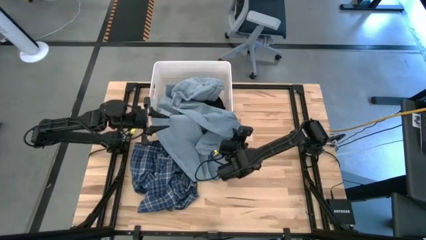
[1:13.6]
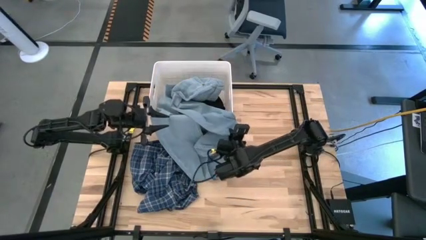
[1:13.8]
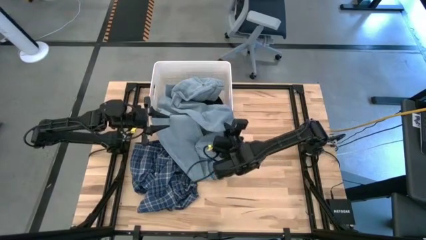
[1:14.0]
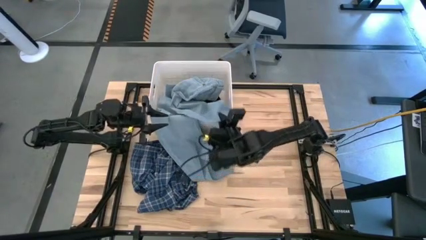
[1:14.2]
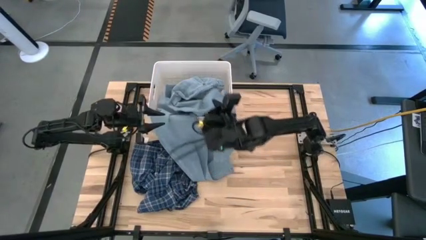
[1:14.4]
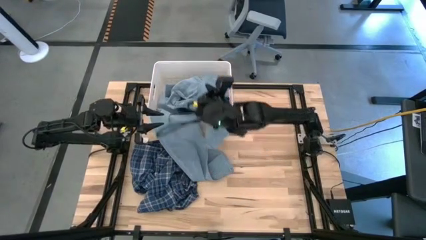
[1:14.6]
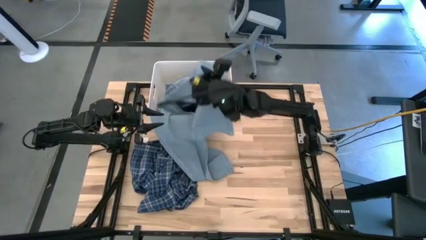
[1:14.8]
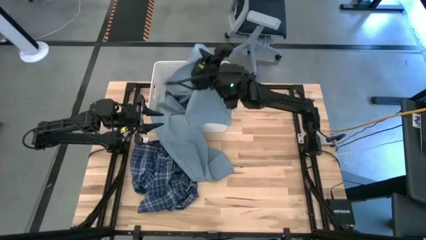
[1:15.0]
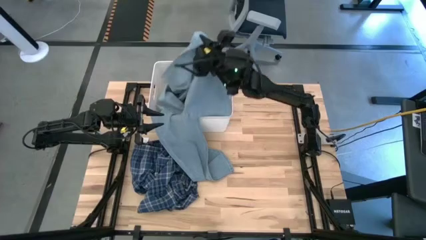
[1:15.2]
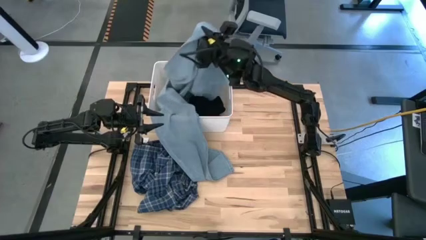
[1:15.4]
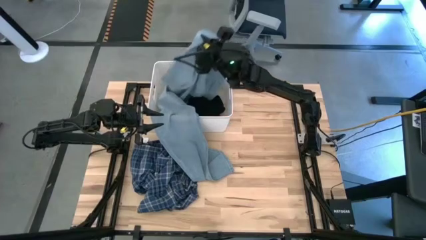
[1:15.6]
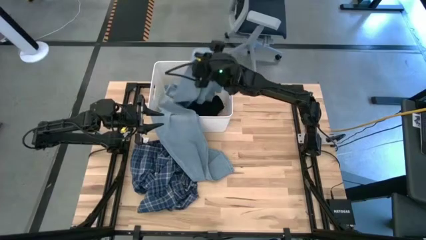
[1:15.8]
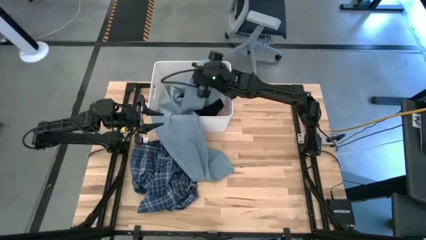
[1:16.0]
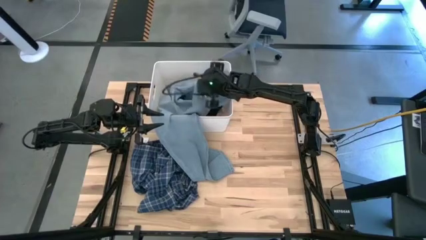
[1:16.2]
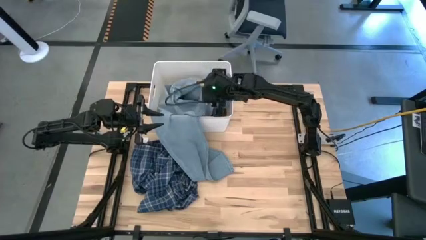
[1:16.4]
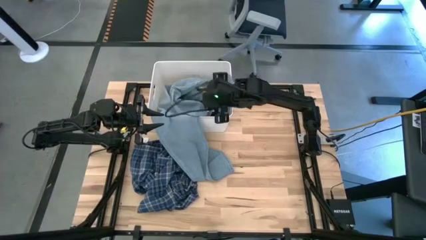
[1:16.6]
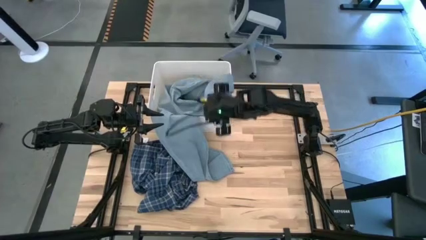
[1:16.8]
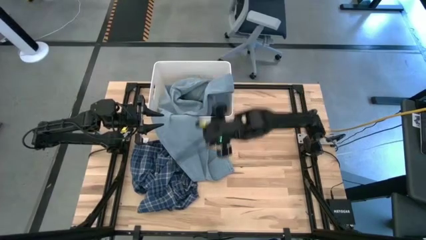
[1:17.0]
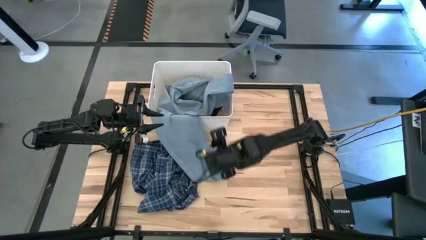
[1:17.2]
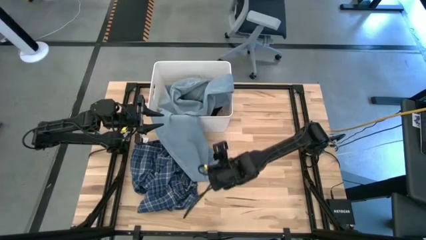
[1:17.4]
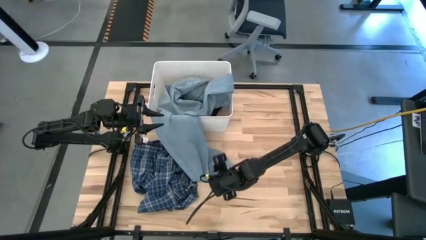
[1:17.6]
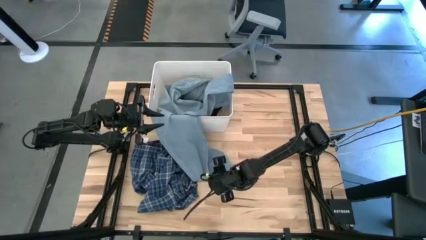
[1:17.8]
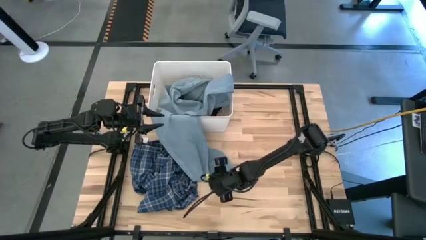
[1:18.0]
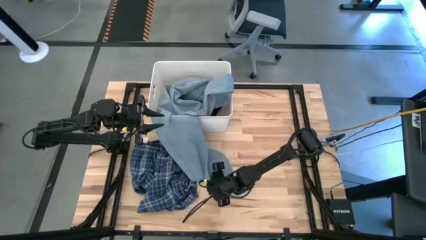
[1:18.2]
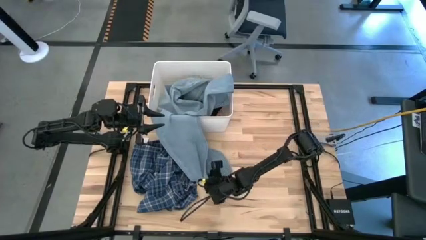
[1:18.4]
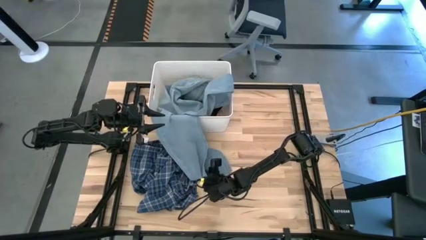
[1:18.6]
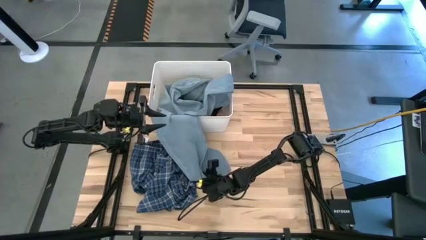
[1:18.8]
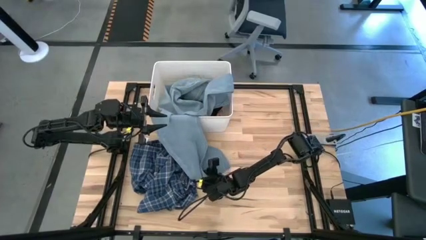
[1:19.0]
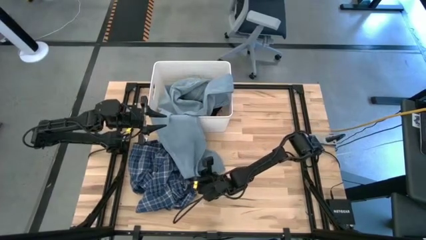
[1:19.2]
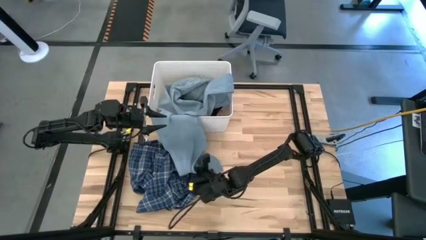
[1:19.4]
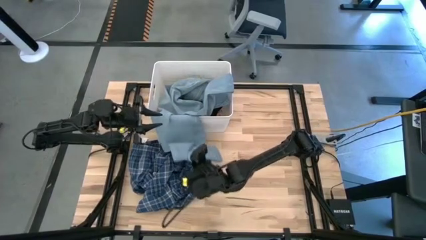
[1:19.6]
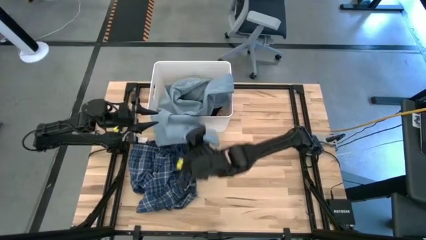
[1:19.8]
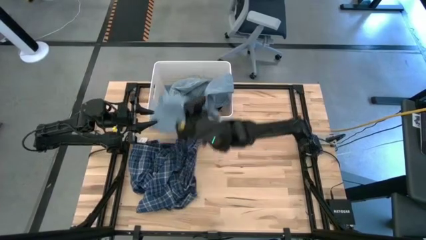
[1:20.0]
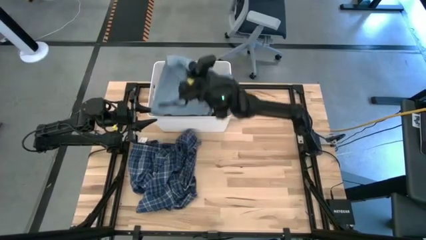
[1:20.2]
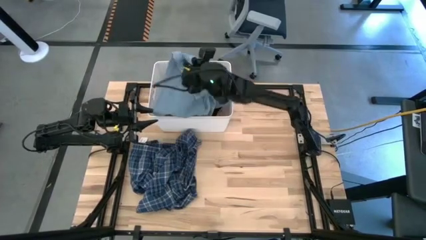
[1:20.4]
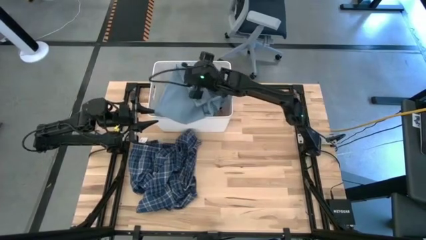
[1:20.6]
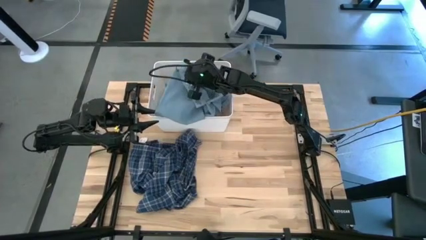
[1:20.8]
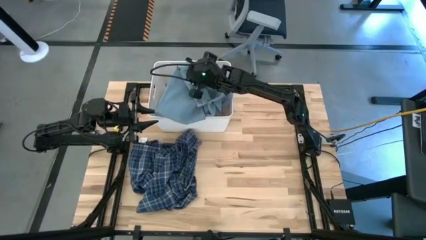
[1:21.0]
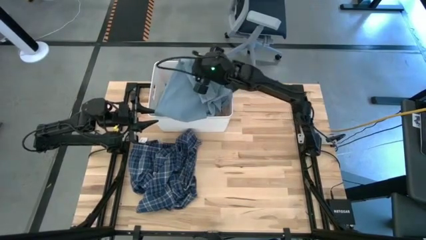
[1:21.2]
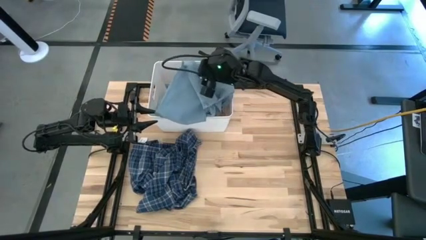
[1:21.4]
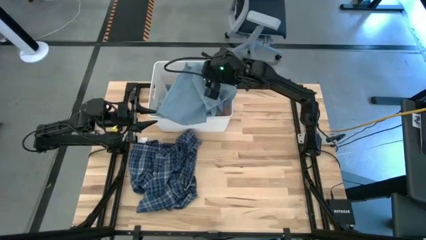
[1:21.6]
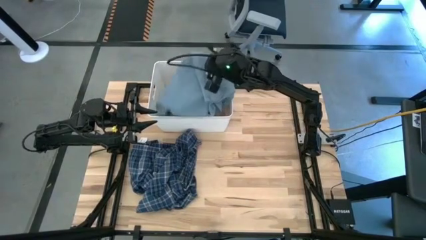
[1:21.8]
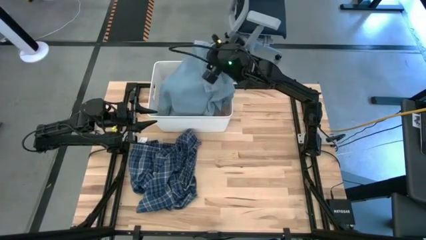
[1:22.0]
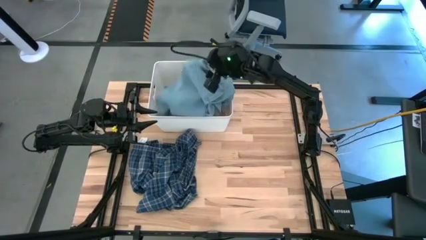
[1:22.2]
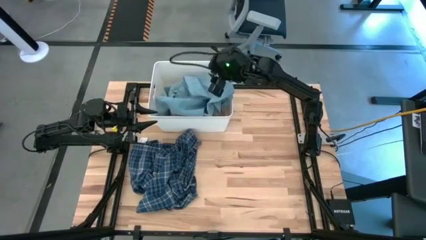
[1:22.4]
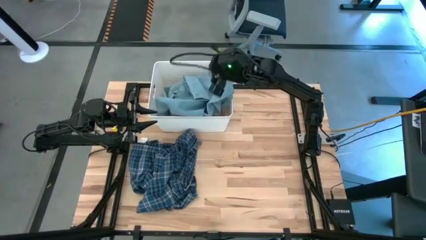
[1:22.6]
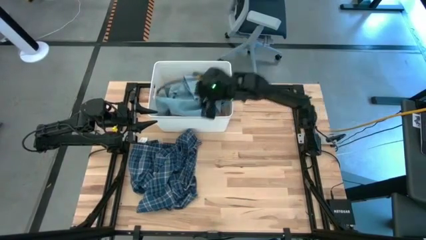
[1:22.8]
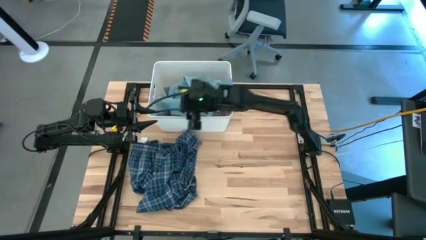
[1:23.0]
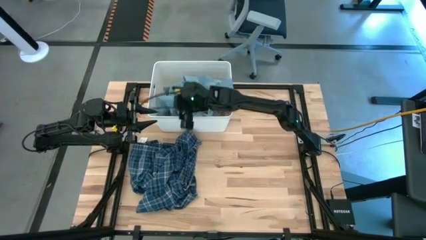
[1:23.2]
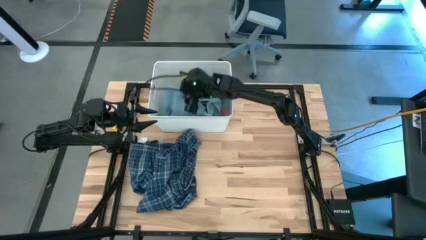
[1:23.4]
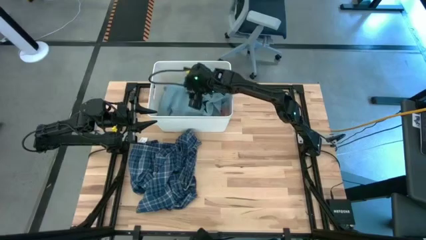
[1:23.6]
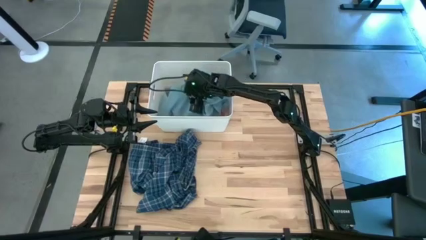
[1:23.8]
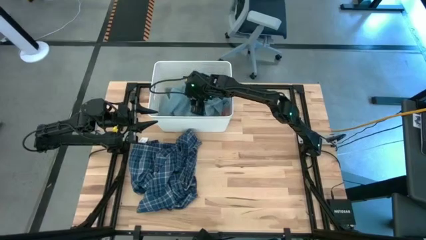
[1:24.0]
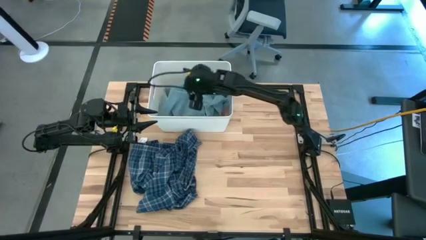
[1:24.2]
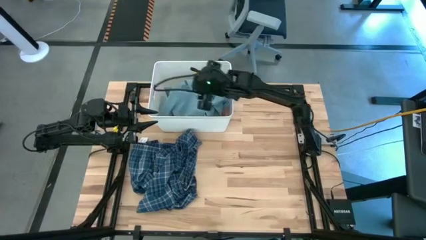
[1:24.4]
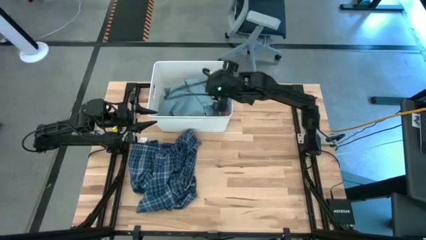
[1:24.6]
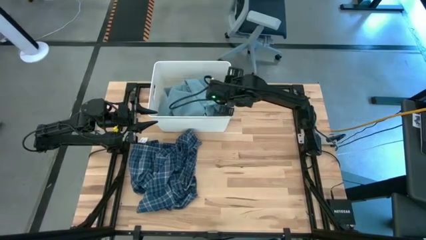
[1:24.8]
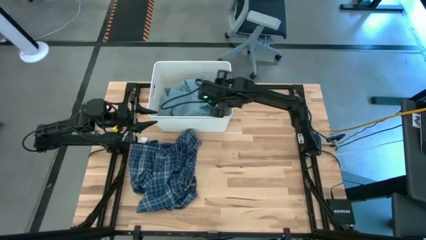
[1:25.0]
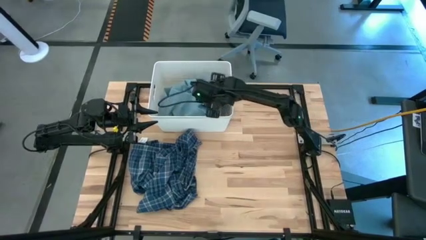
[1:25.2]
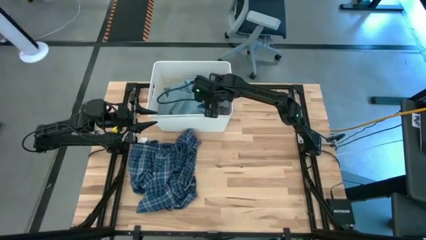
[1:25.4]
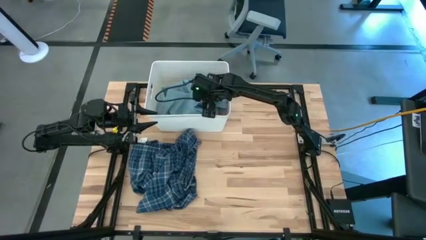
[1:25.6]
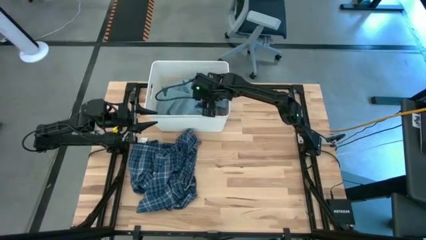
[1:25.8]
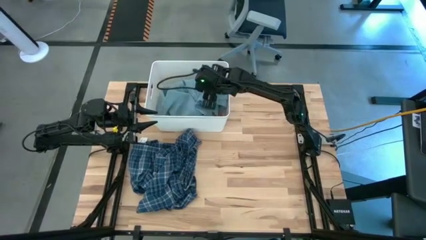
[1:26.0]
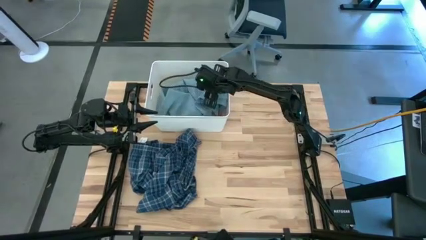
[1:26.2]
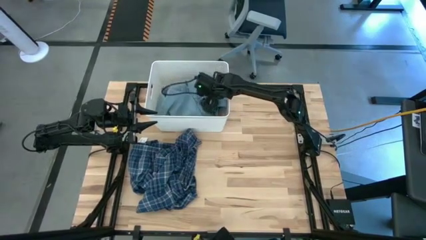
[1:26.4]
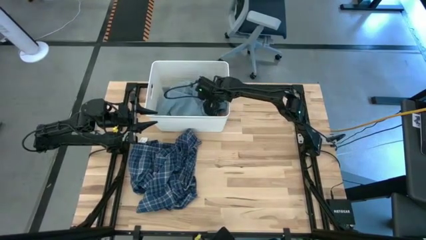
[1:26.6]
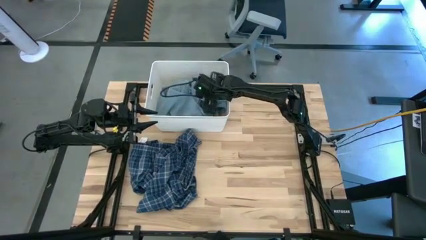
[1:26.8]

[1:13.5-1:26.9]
Task: Sort clothes
Put the blue pants into the white bin

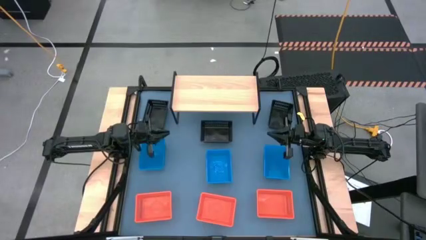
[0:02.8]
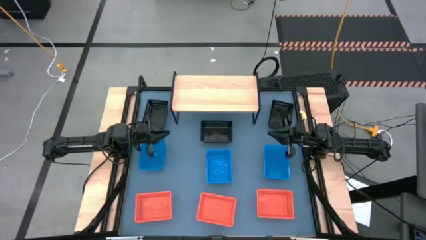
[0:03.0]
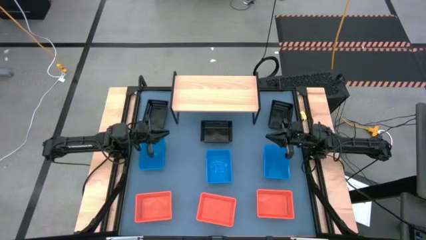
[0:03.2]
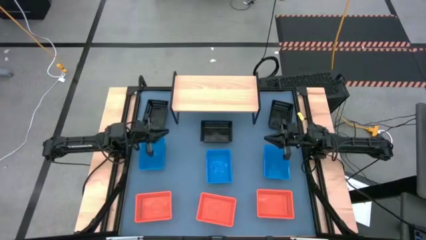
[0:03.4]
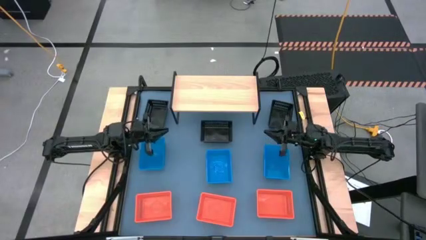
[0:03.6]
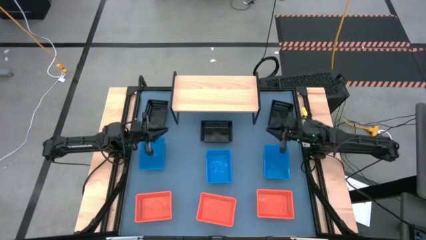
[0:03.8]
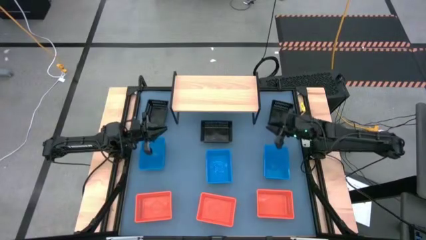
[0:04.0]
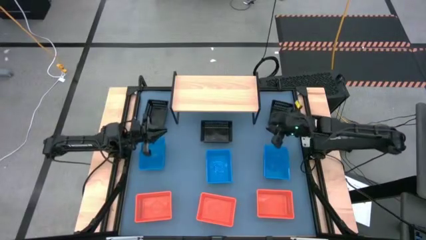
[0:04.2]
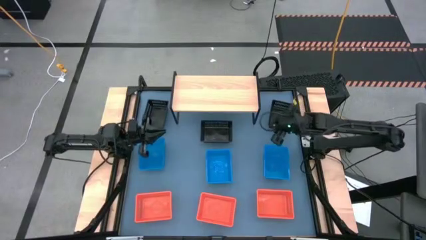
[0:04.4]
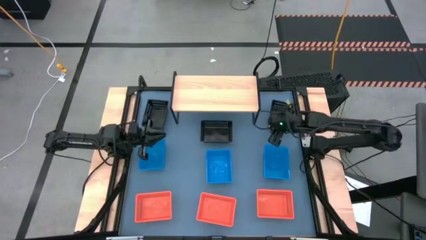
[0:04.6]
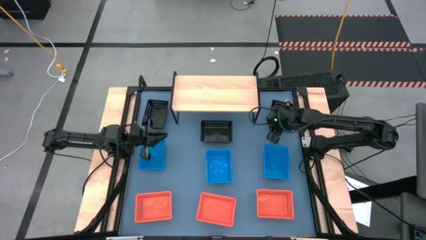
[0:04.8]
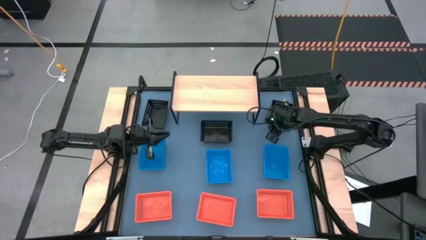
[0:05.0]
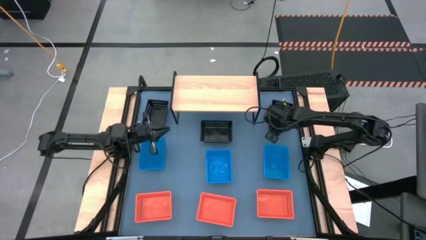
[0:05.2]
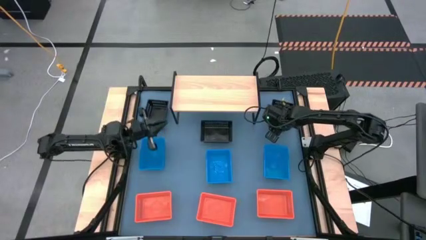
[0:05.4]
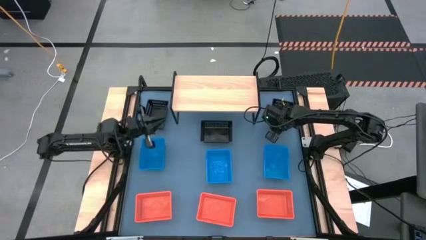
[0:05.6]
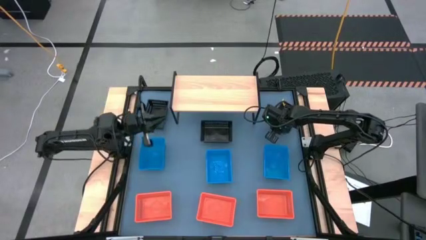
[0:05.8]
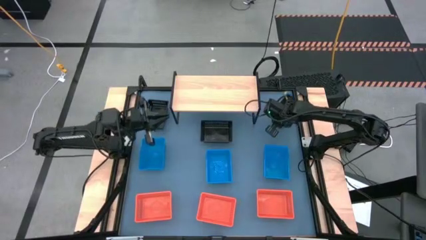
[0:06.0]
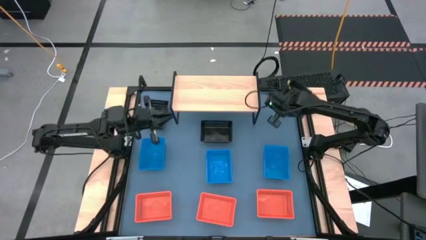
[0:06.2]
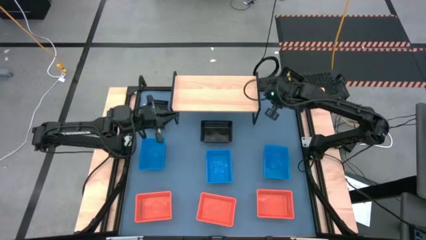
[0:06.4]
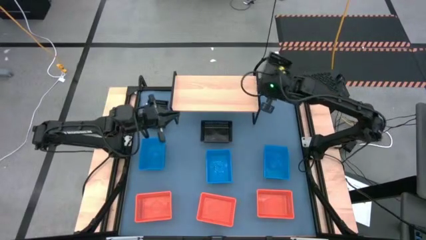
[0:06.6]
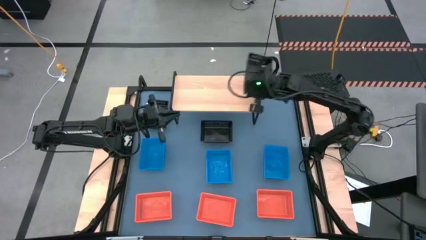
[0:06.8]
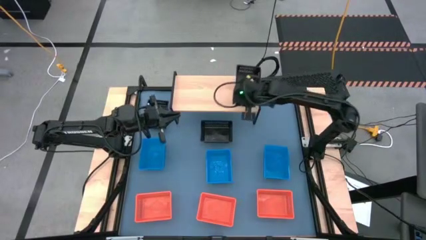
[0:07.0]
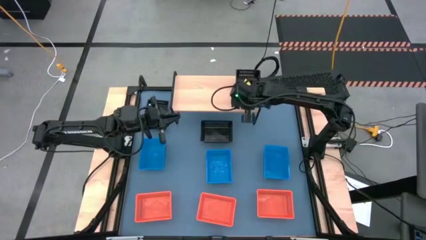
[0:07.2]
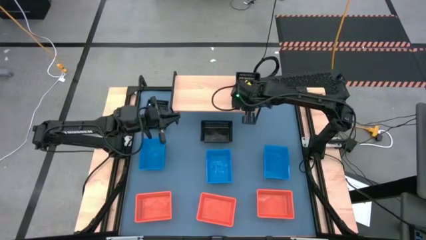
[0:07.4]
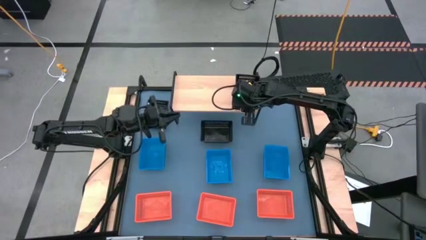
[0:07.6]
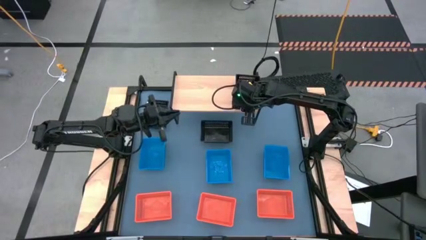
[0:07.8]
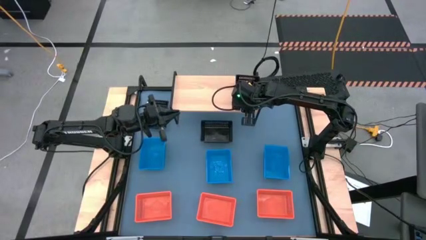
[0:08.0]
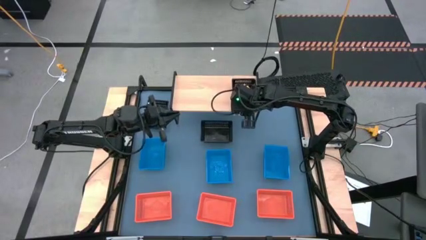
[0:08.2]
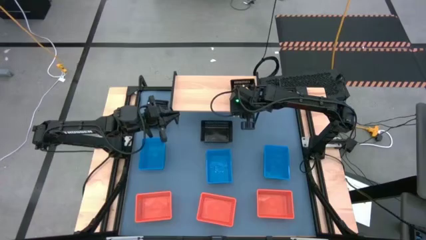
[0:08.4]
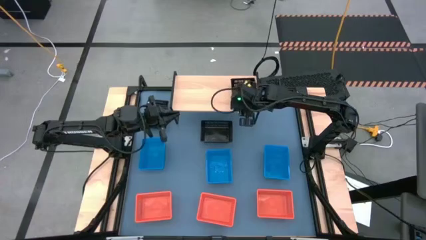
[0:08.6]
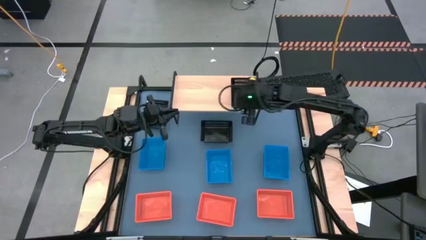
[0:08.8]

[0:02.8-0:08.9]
Task: Stack baskets on shelf by color
Put the right black basket on the shelf
